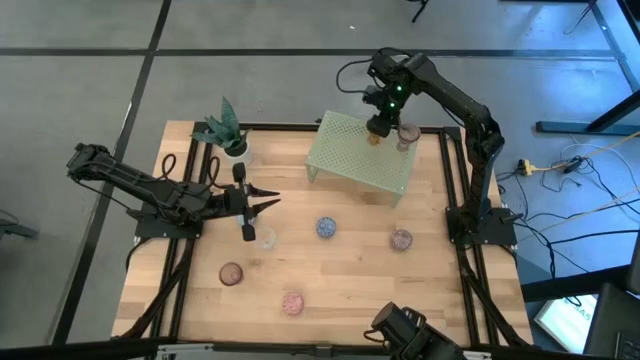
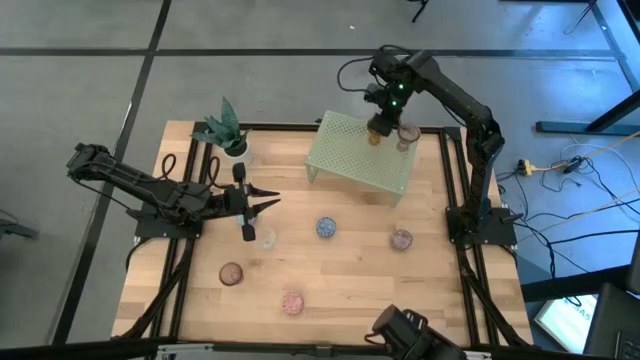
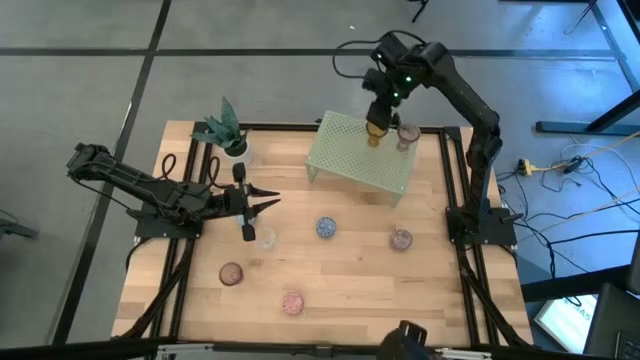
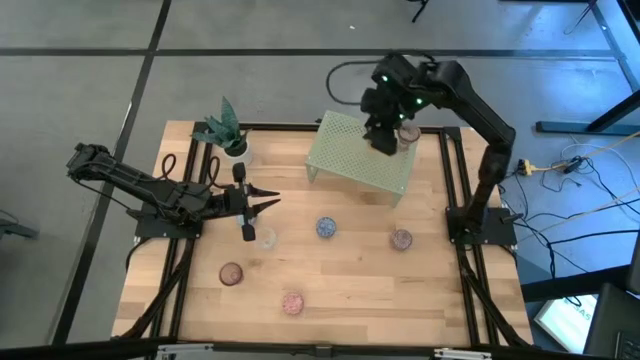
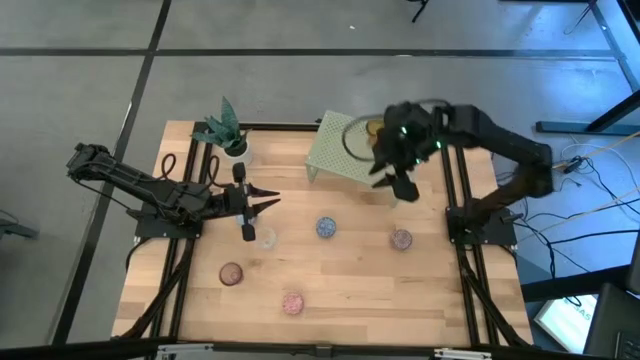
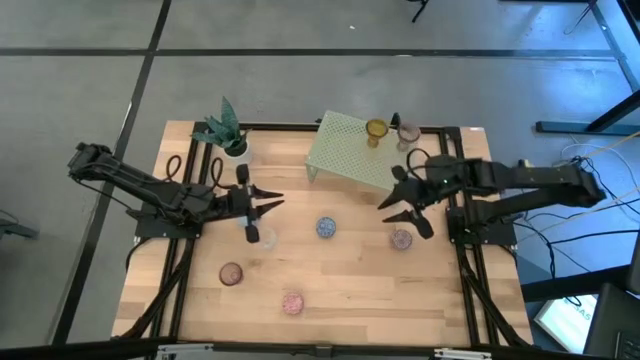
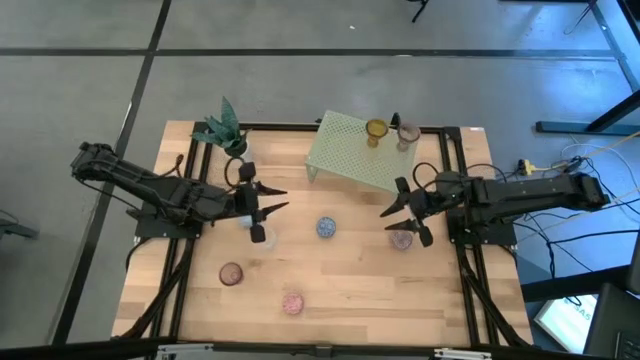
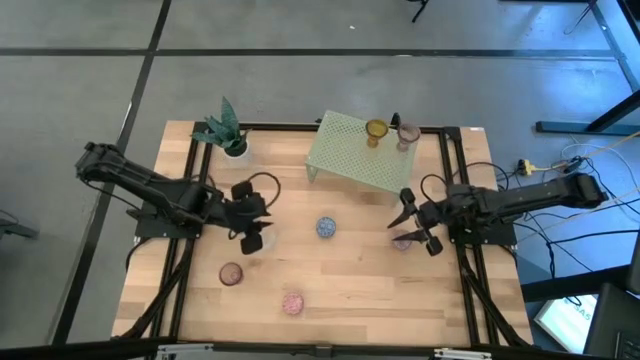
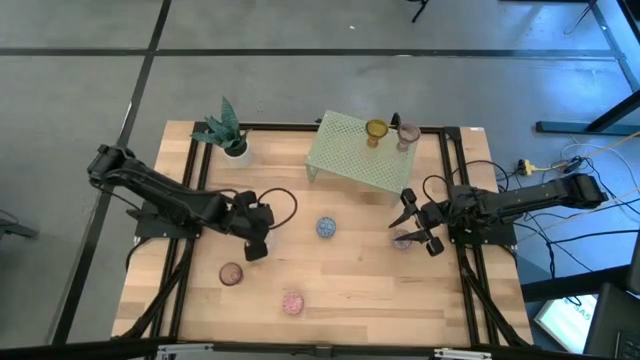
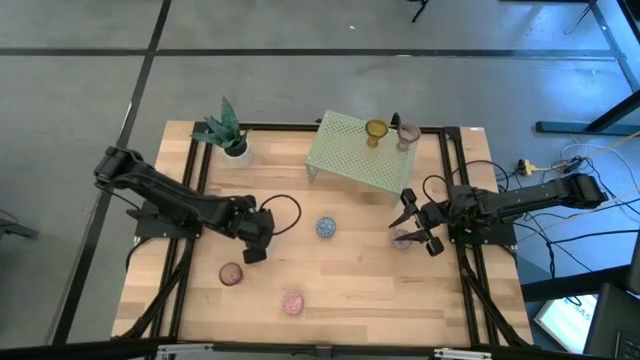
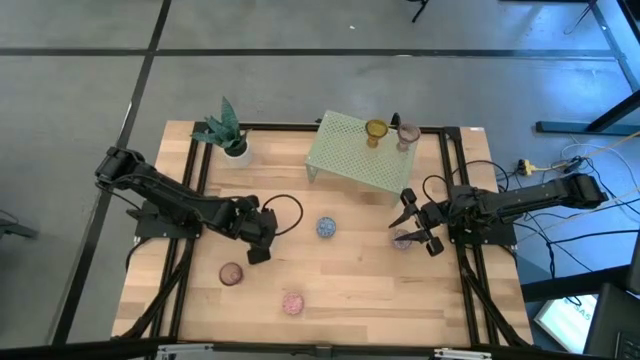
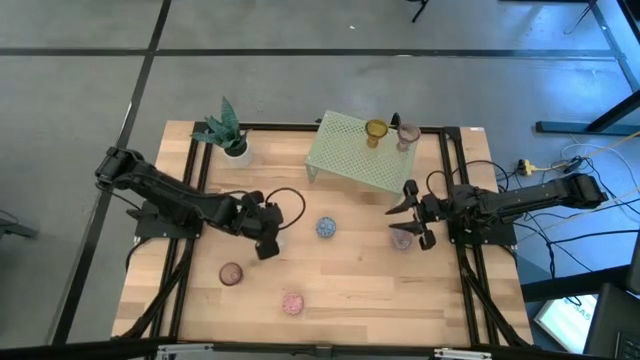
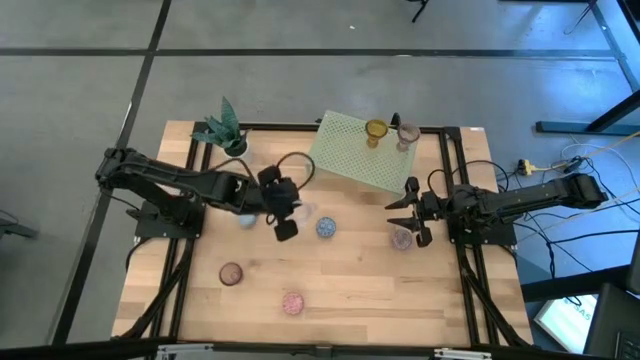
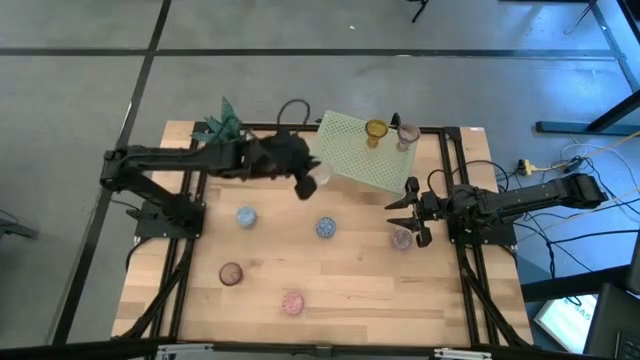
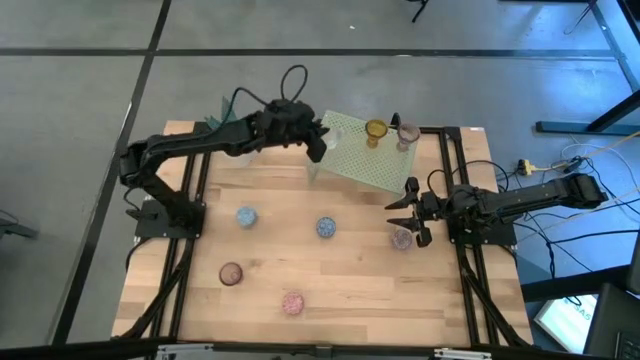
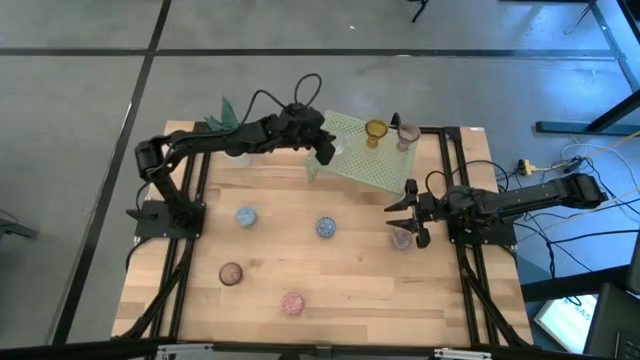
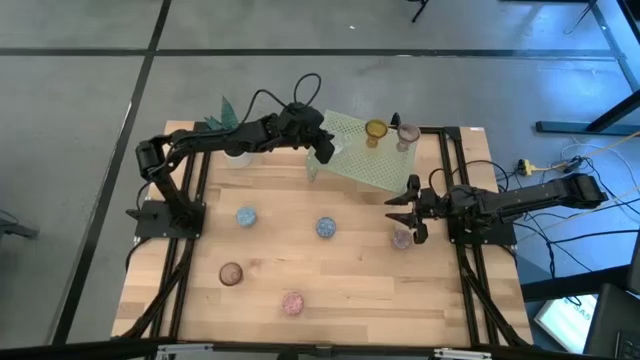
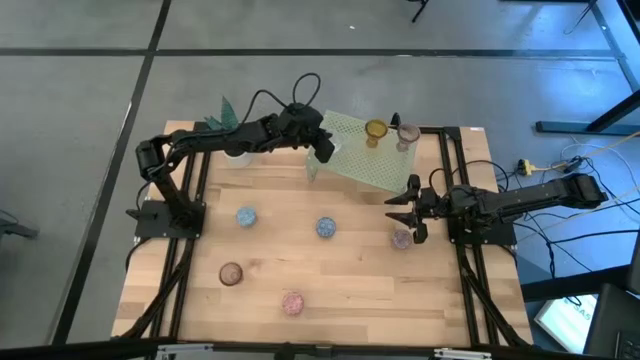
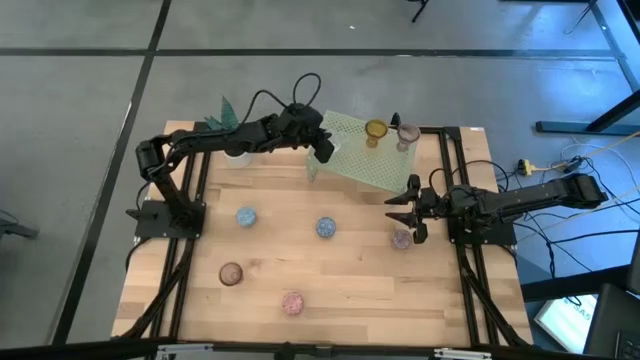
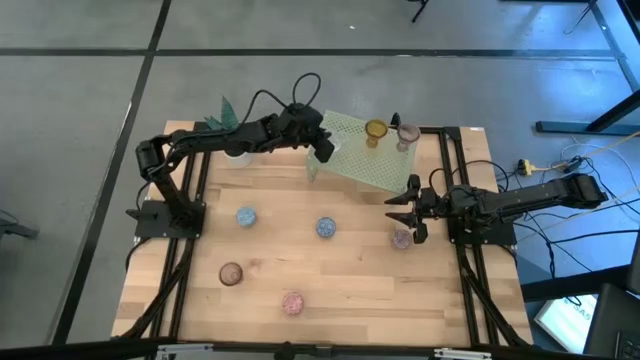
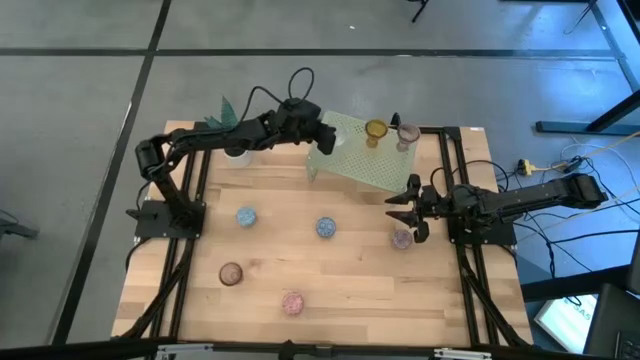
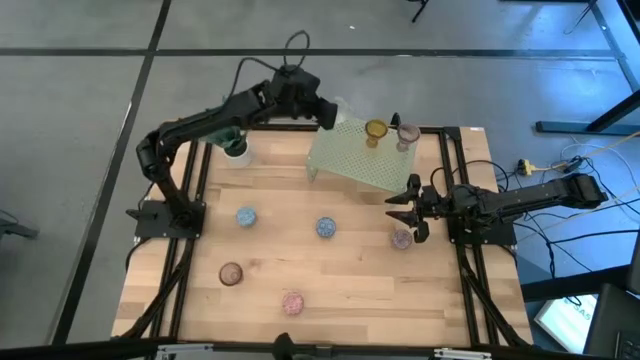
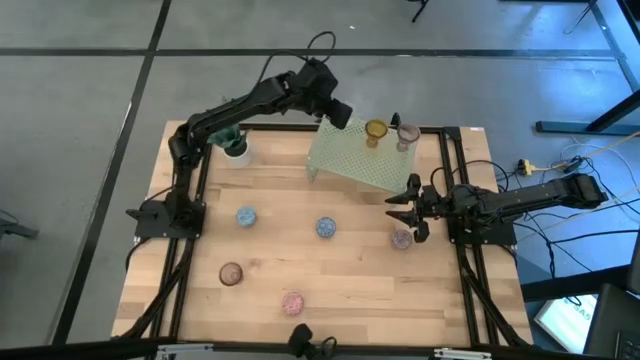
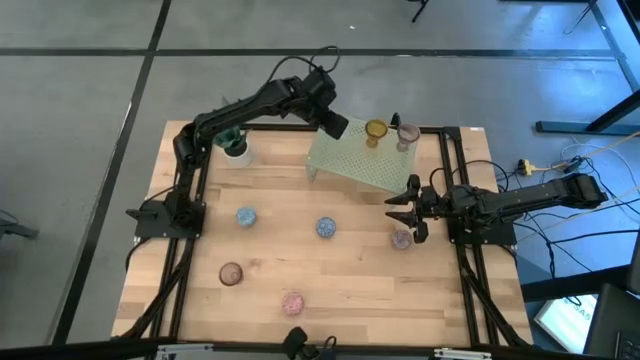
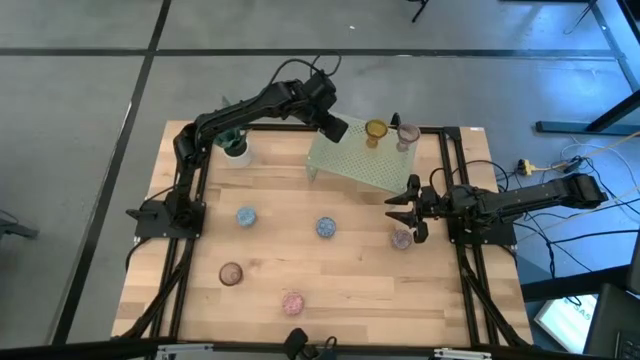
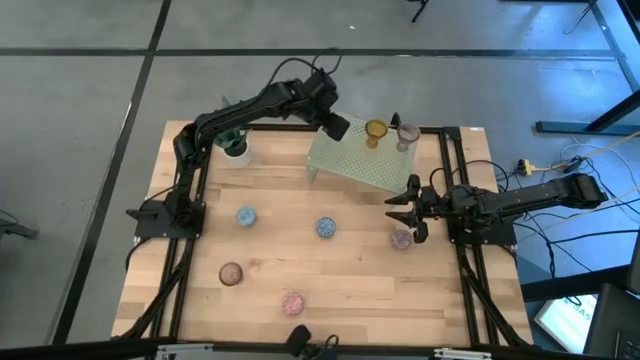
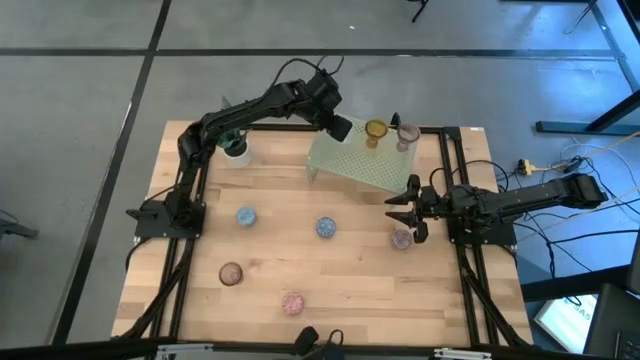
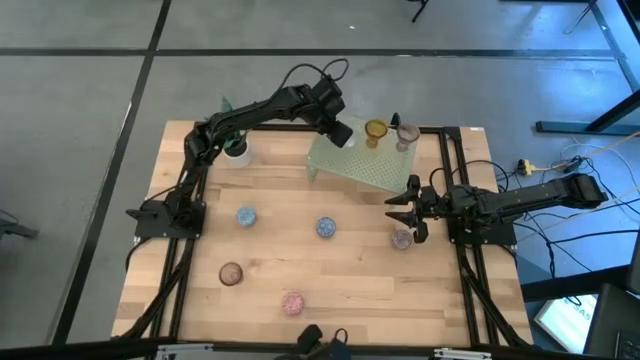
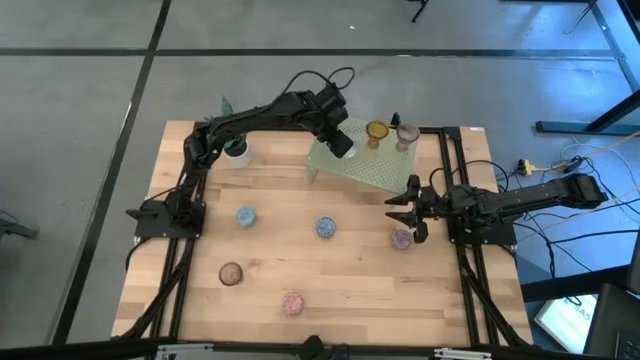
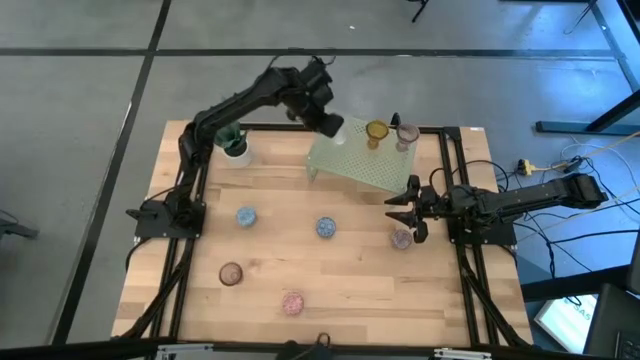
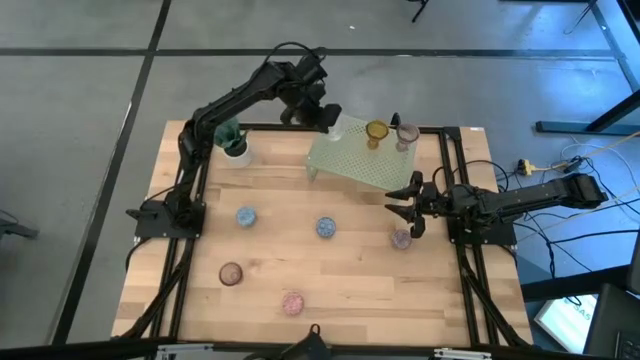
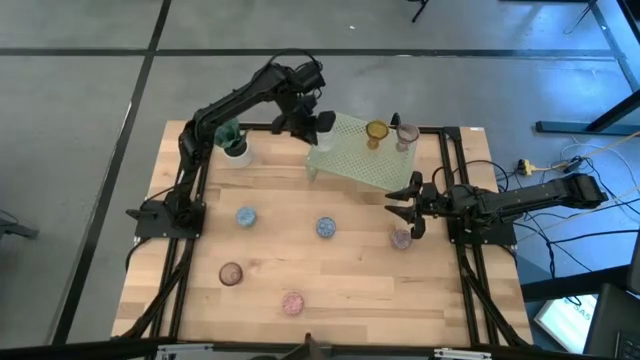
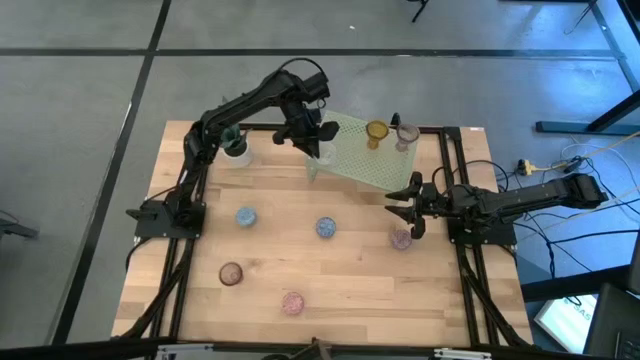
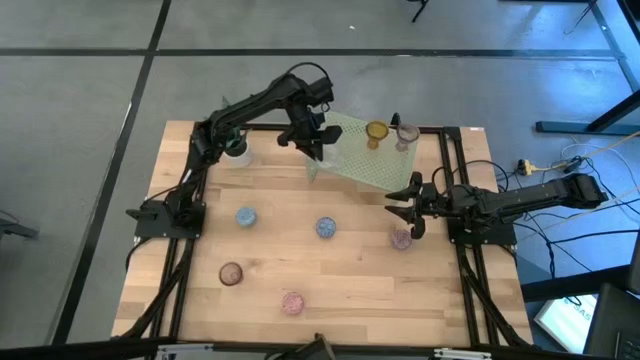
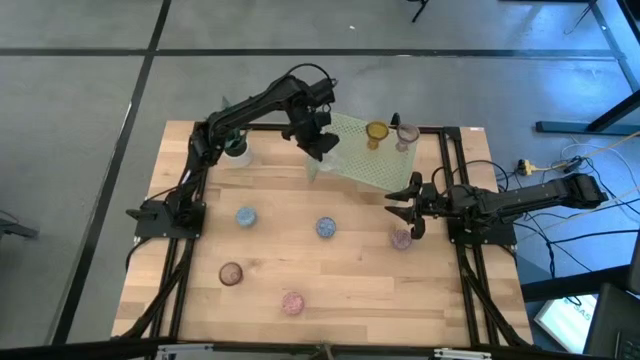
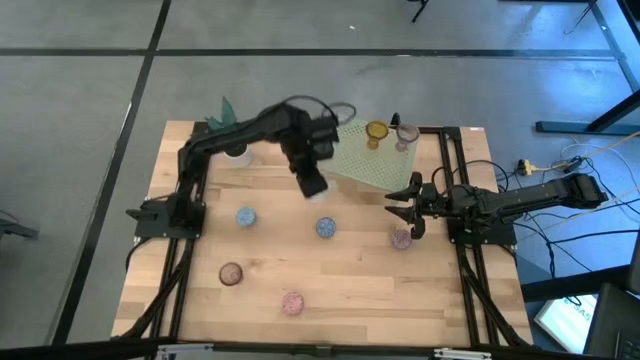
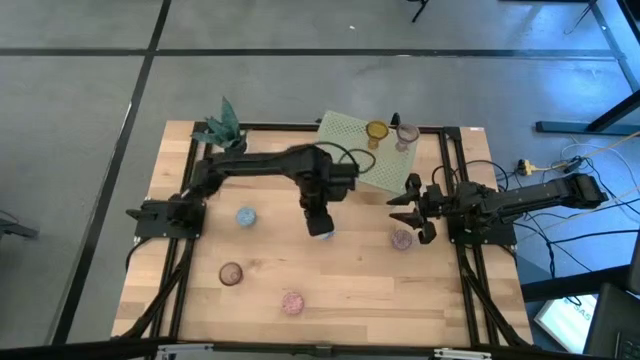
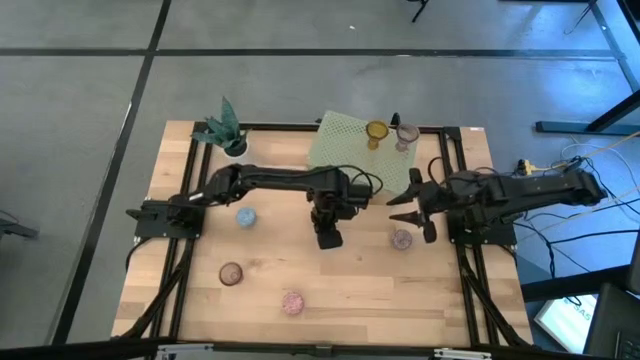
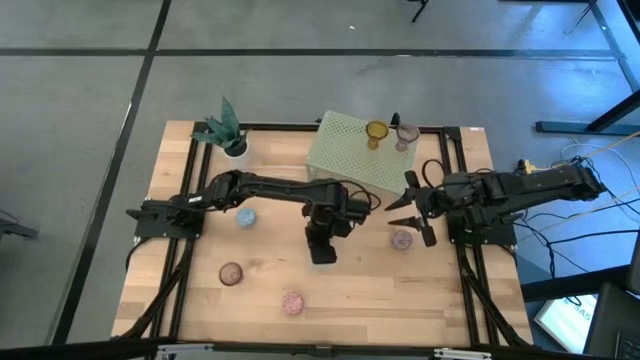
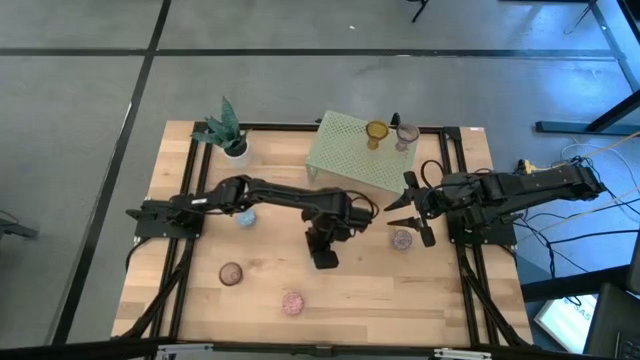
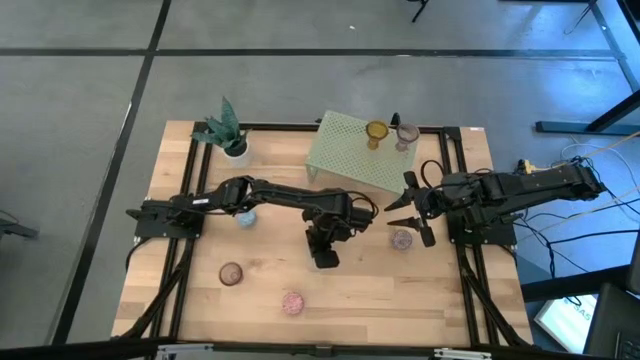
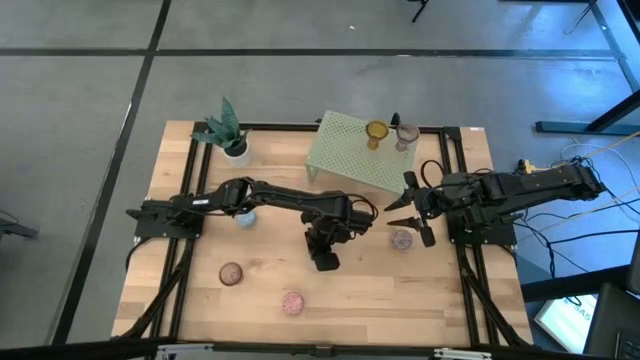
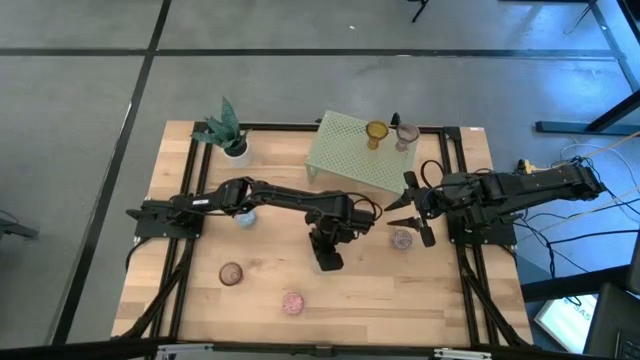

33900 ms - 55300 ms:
Task: Pick & Place candle stick holders
Put the transparent candle holder on the shelf aligned with the brown candle holder
